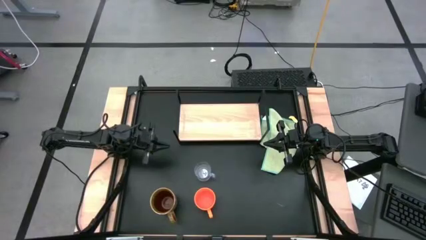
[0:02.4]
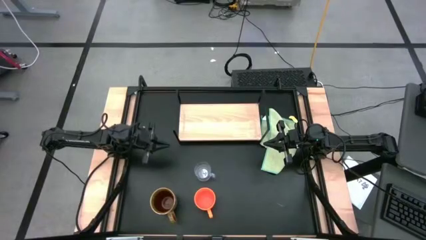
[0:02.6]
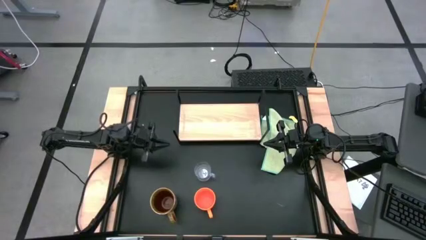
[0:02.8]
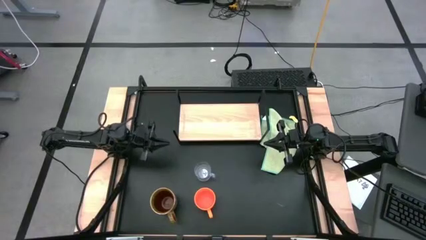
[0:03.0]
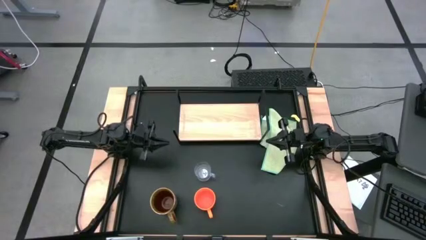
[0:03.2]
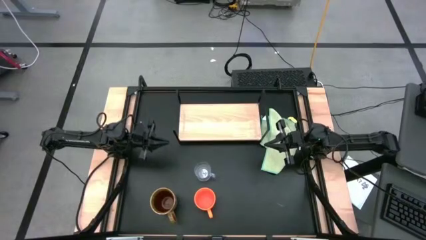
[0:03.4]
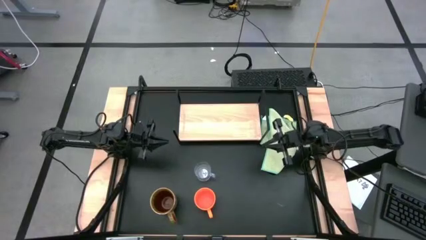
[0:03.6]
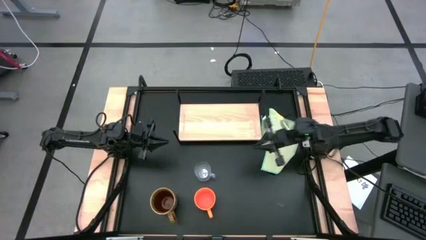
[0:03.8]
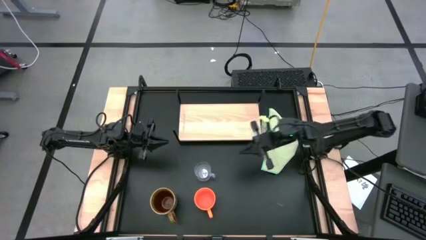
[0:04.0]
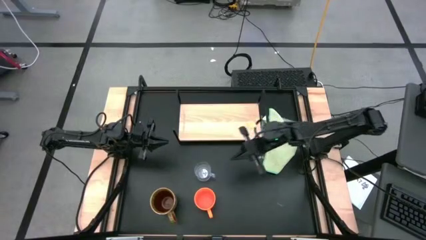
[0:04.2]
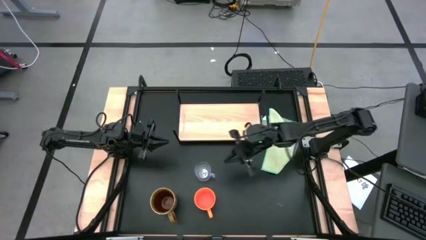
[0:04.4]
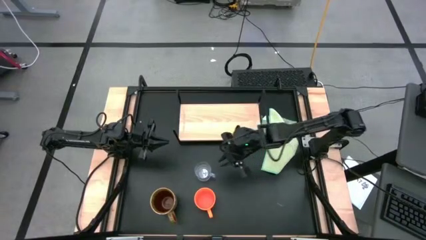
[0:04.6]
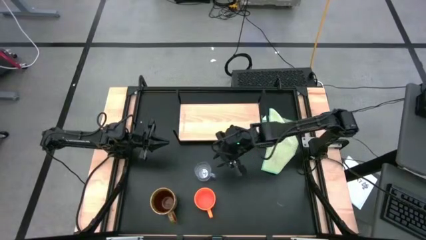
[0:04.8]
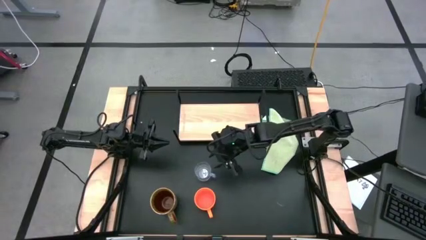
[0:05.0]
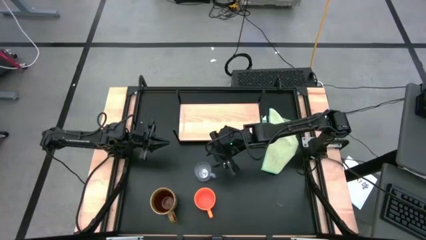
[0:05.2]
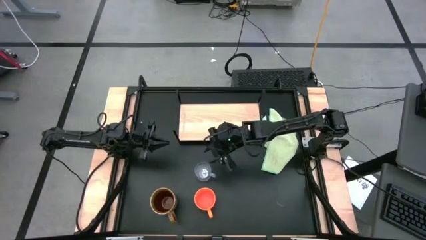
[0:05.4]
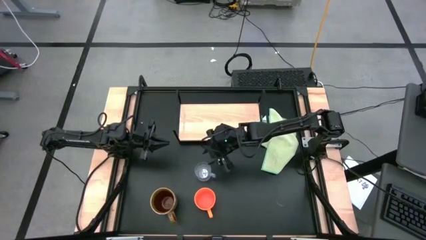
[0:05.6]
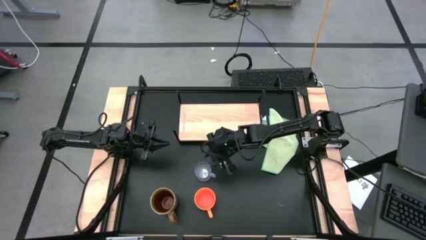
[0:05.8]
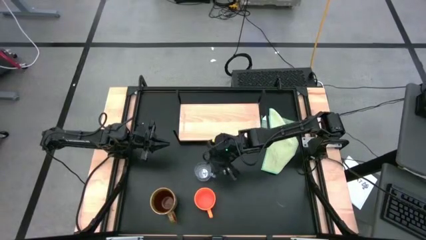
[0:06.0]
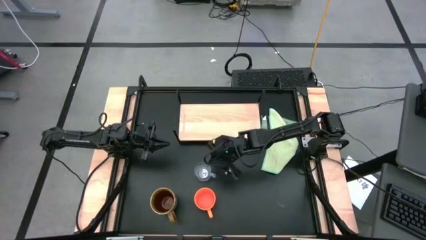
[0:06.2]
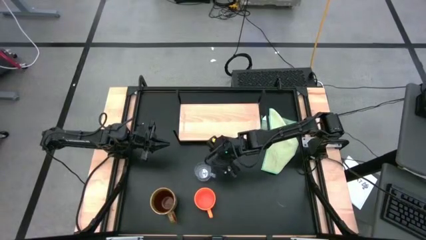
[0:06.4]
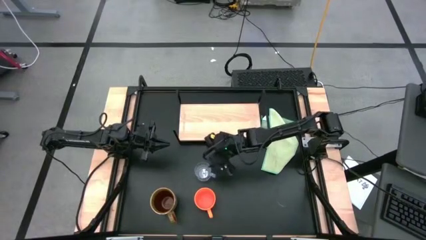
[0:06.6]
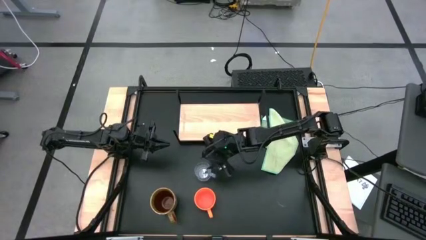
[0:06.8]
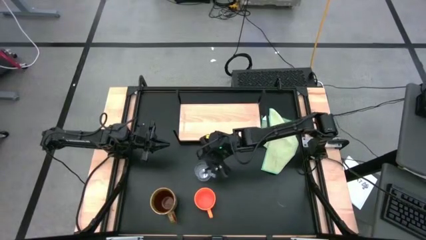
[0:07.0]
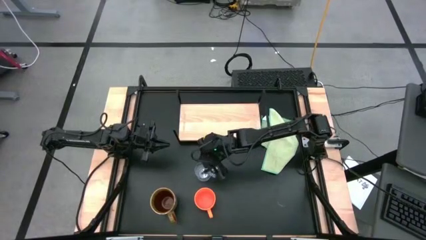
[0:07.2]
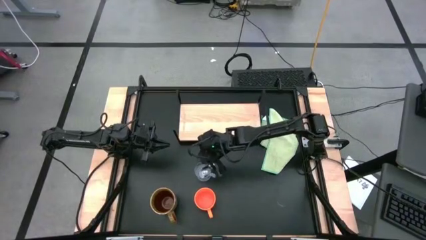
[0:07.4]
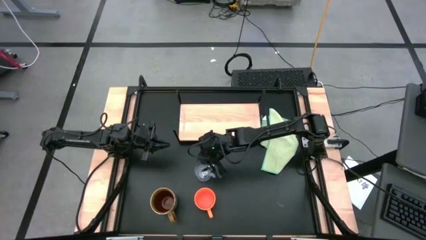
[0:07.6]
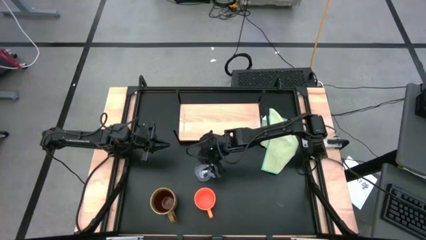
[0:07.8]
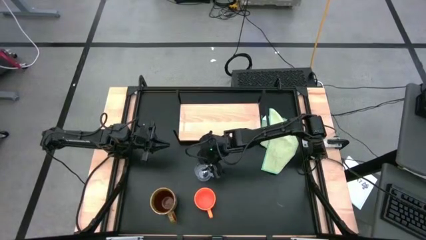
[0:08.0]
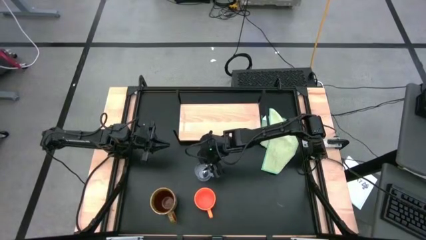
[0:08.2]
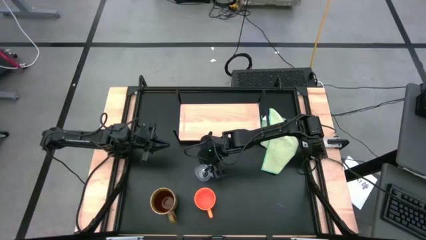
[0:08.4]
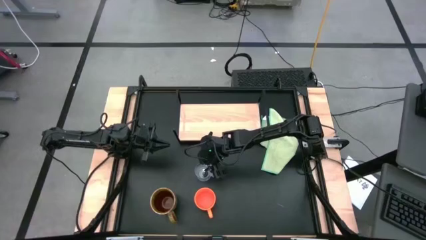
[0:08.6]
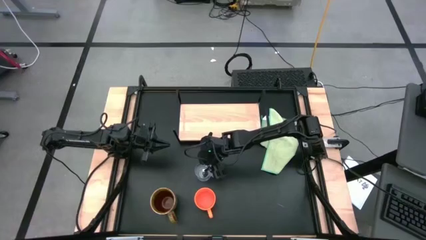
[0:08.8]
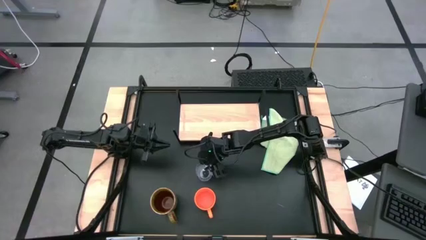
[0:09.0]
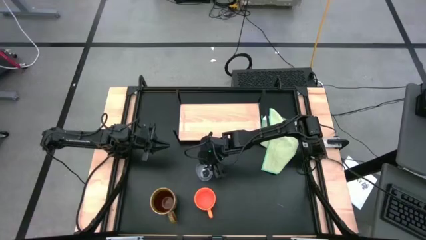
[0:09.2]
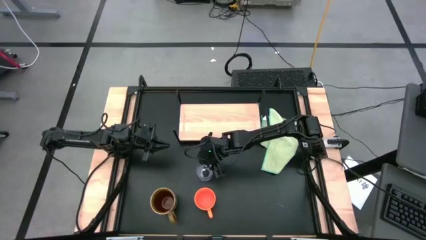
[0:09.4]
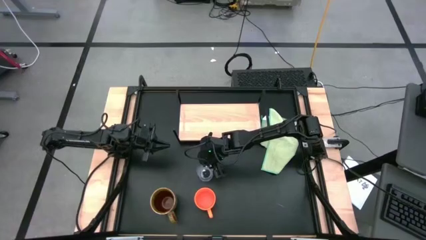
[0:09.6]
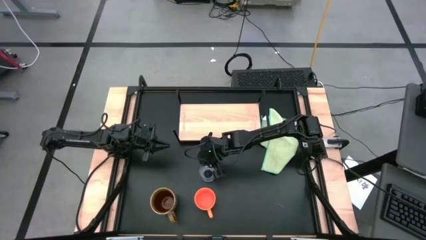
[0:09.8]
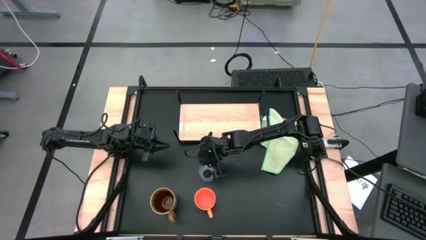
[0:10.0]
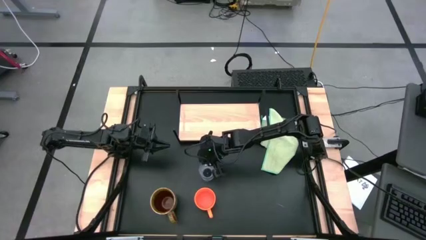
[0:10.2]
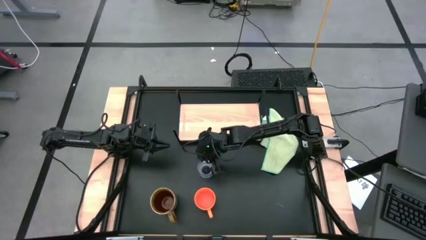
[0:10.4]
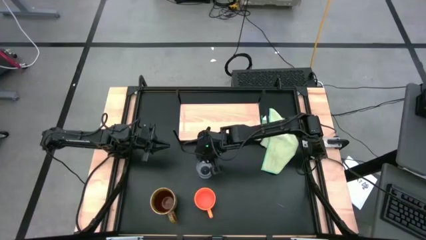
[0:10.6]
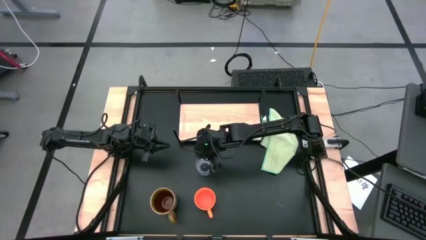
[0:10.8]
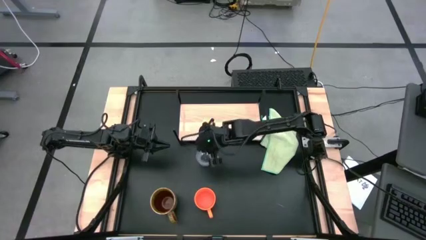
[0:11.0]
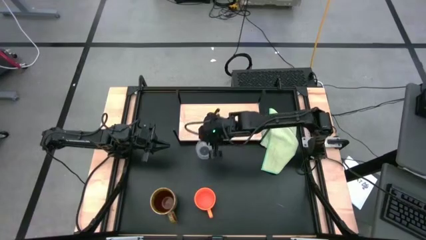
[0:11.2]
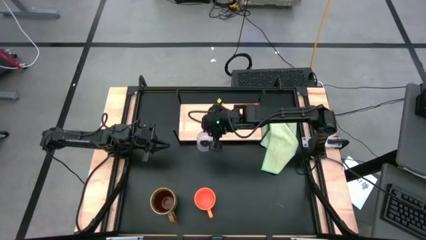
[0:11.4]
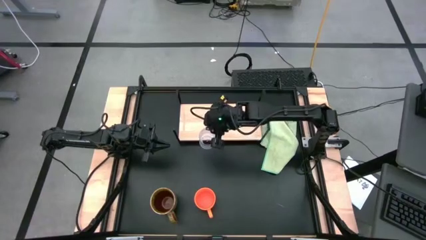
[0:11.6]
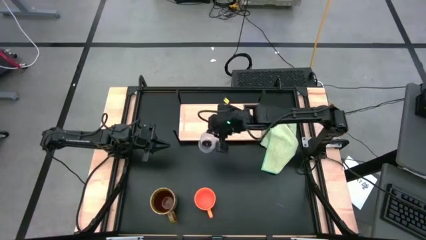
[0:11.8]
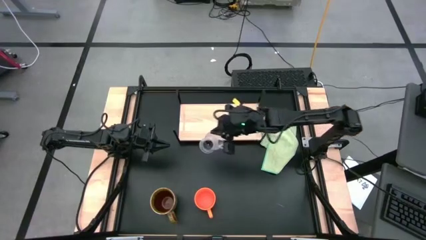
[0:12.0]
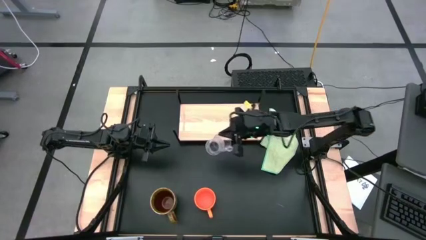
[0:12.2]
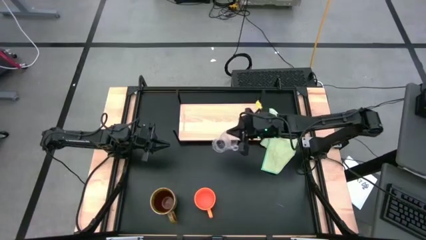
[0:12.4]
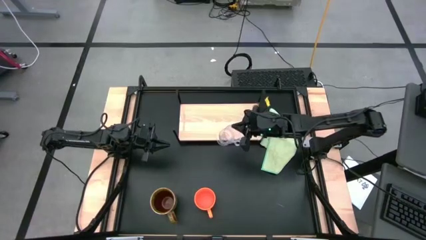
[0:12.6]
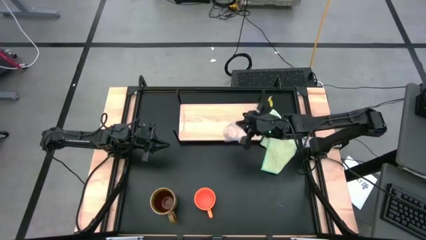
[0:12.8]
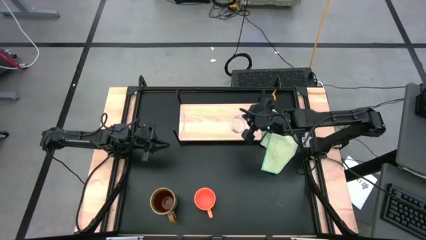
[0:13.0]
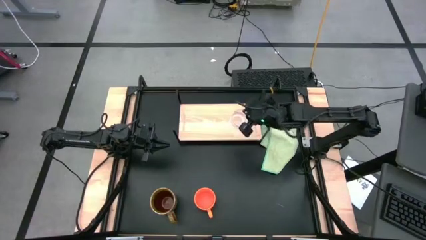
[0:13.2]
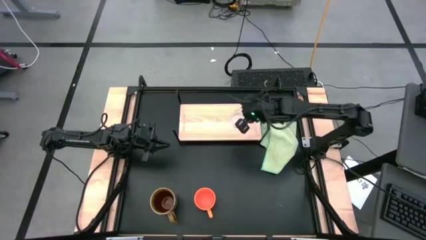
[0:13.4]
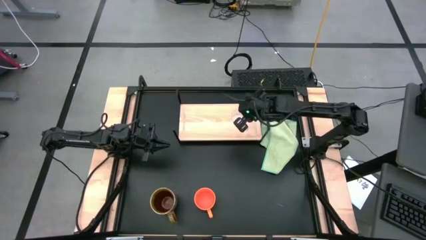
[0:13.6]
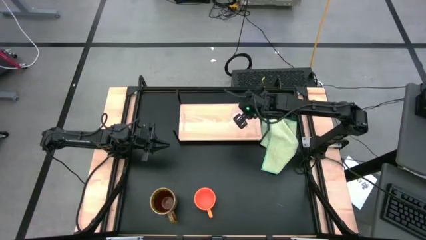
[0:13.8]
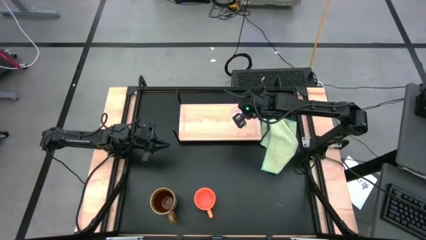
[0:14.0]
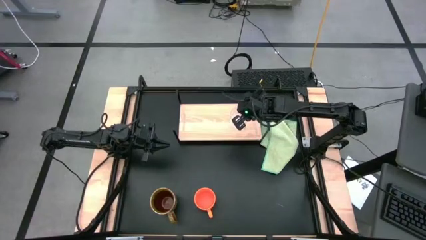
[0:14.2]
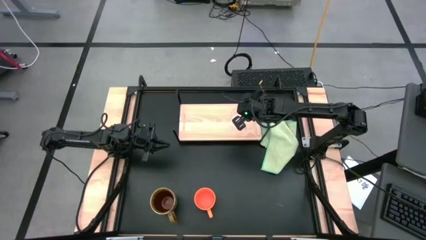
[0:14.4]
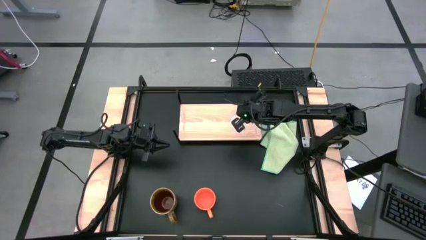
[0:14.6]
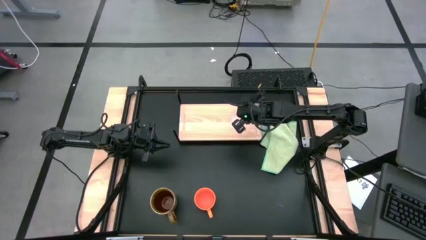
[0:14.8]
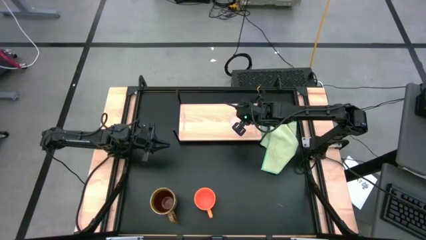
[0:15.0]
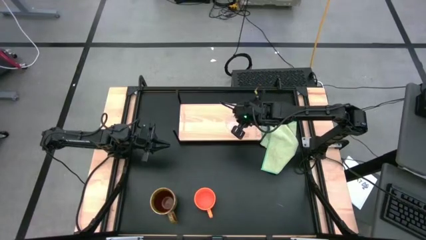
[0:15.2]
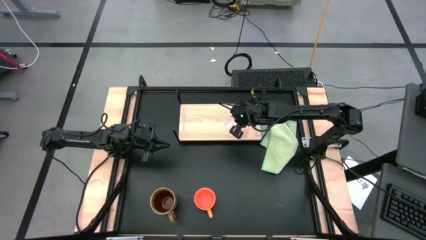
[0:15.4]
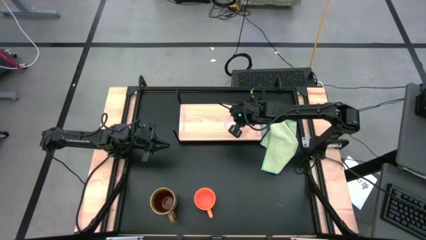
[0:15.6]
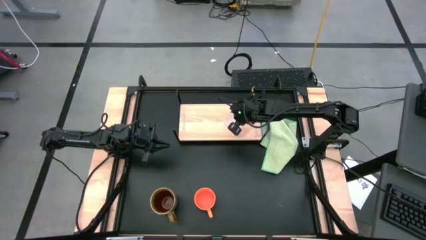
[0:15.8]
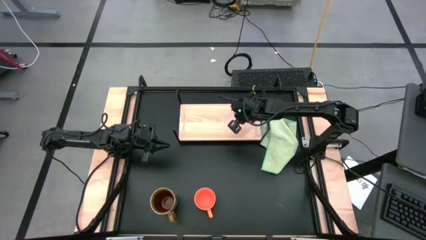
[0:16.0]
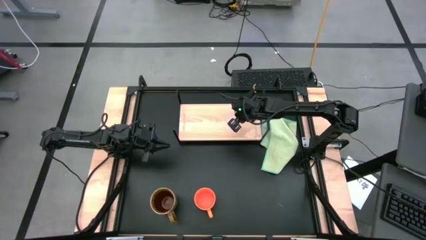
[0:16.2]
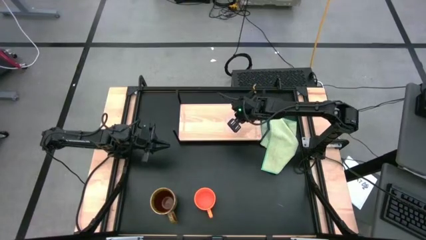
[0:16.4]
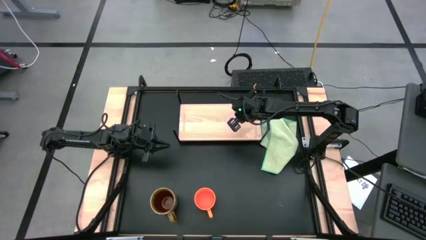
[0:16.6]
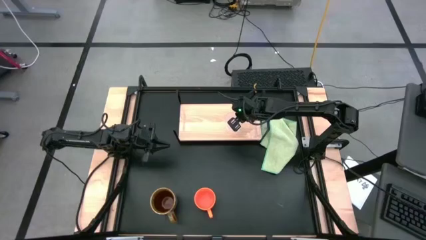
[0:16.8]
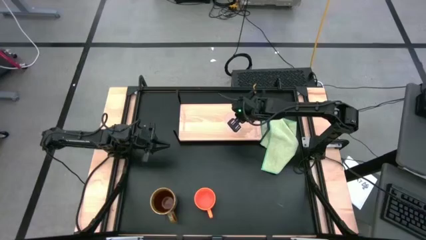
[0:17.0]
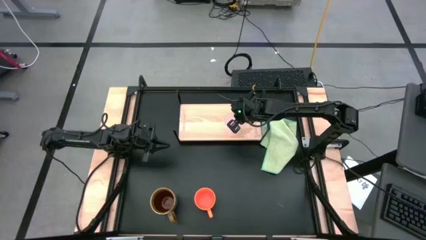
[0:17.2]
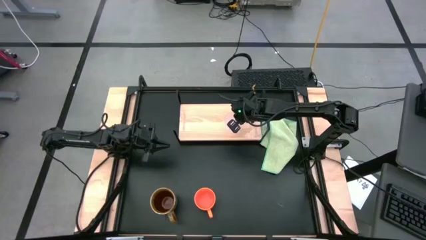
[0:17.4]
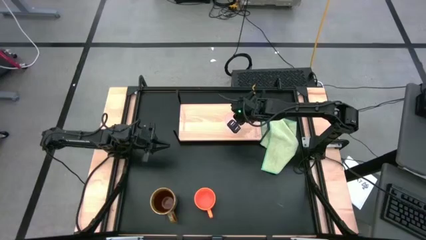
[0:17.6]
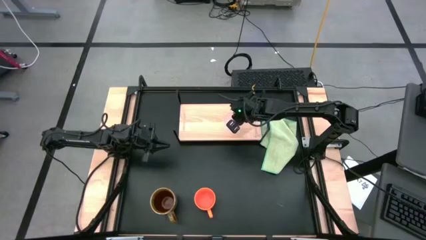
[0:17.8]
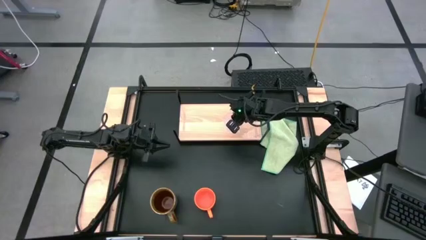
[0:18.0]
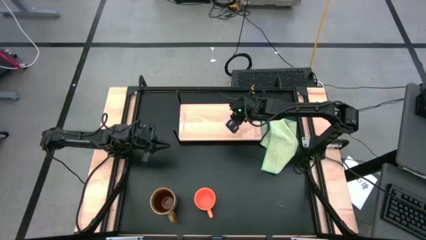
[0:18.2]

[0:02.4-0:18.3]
Task: Stack small to large cups/mugs on shelf
Put the transparent mug on the shelf
